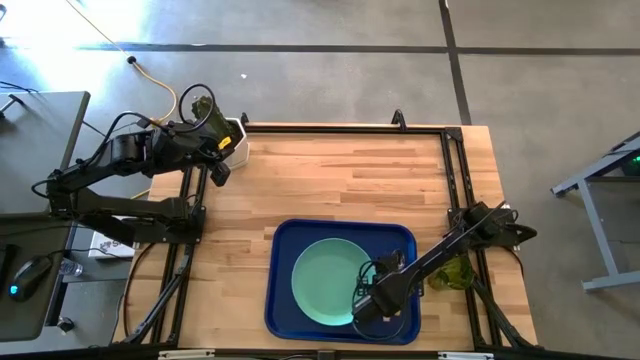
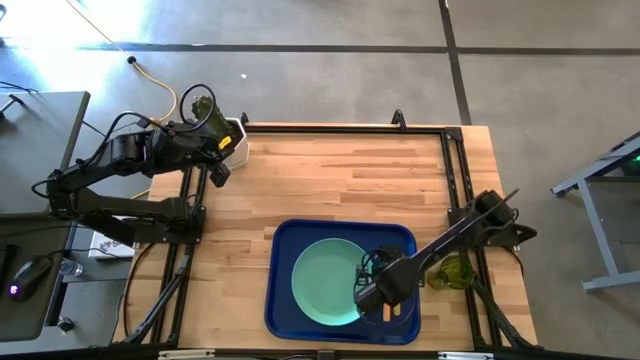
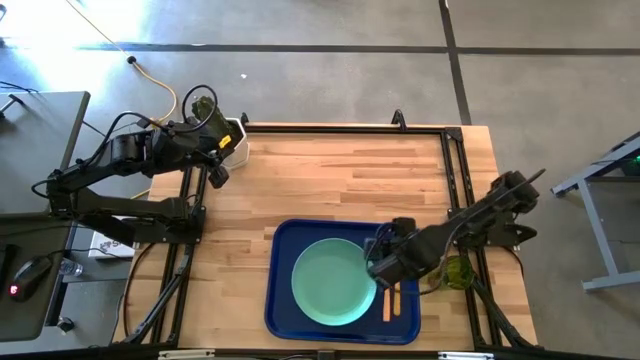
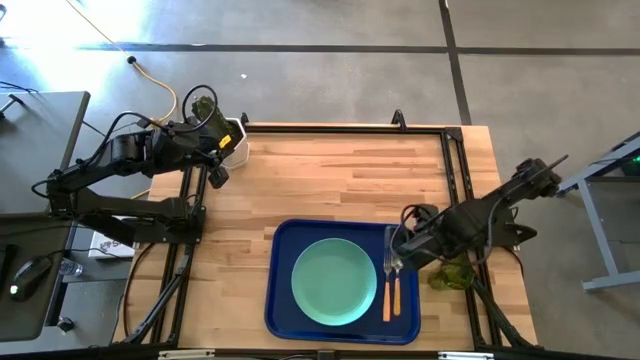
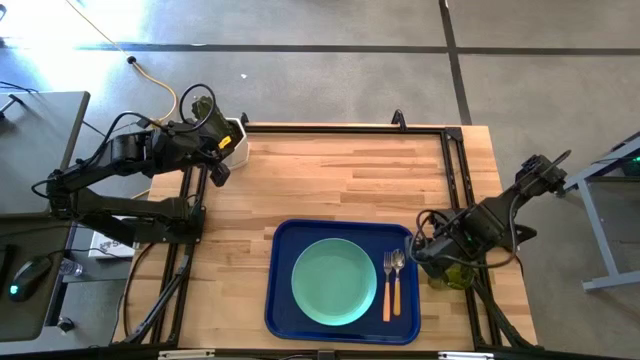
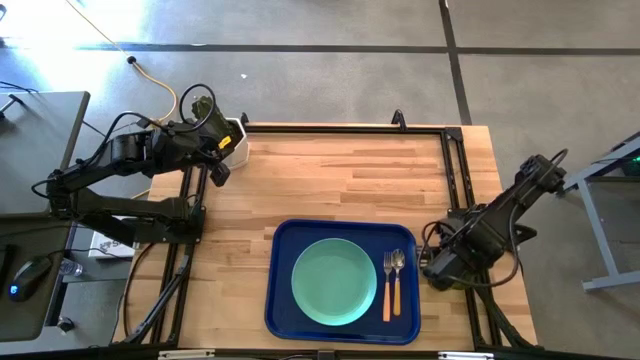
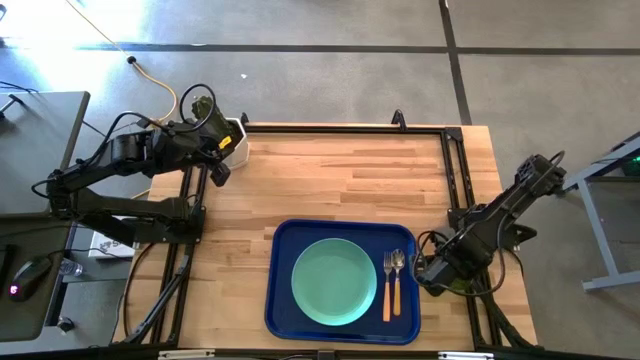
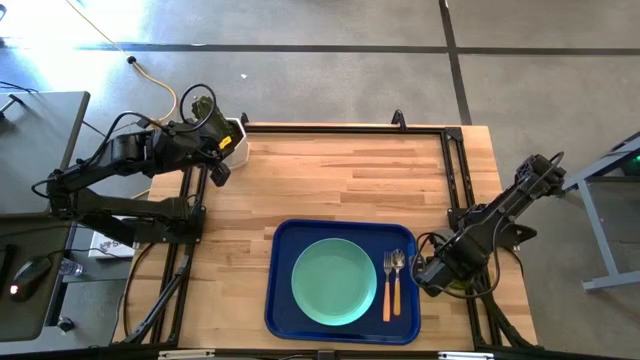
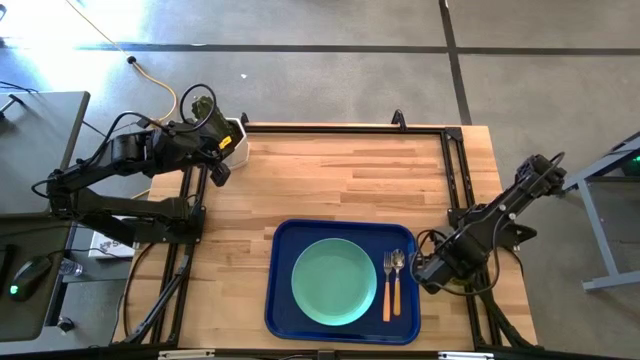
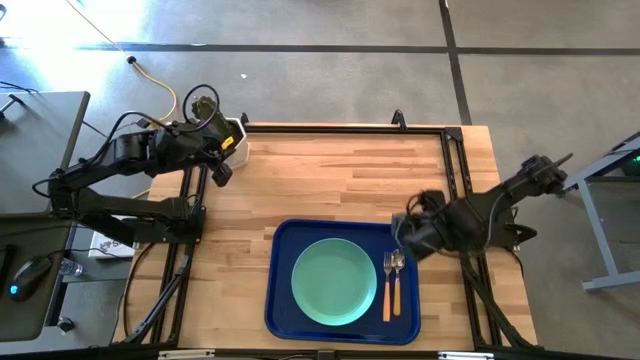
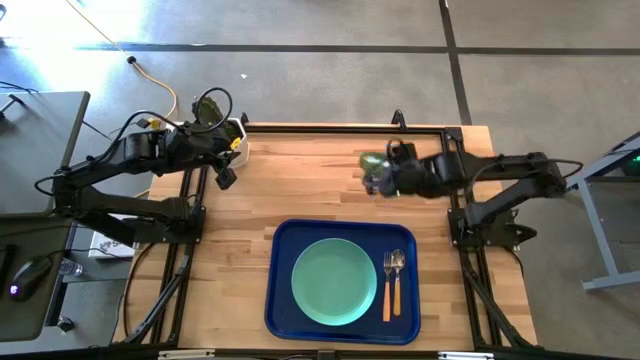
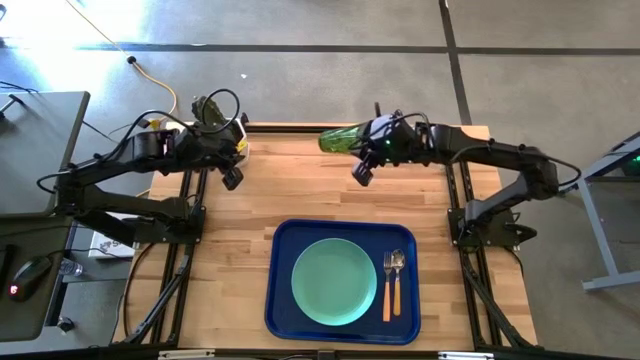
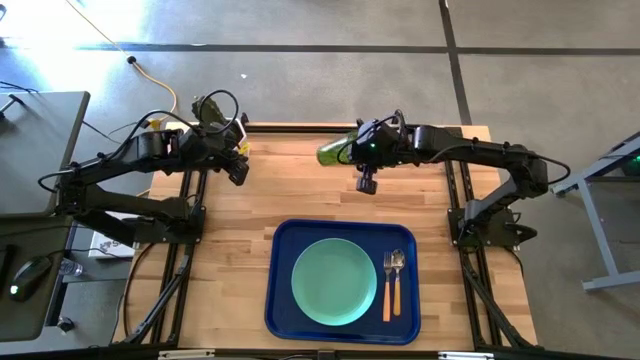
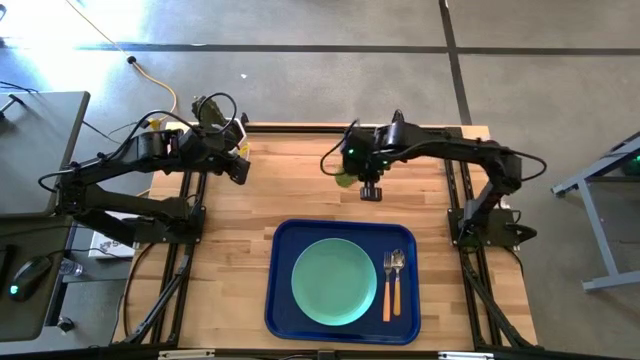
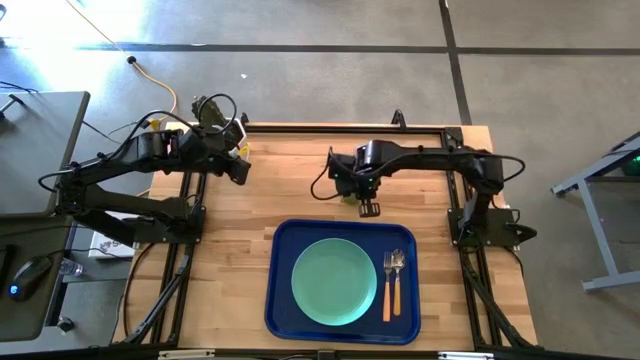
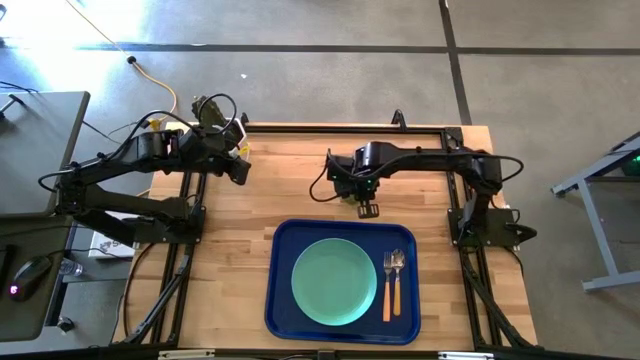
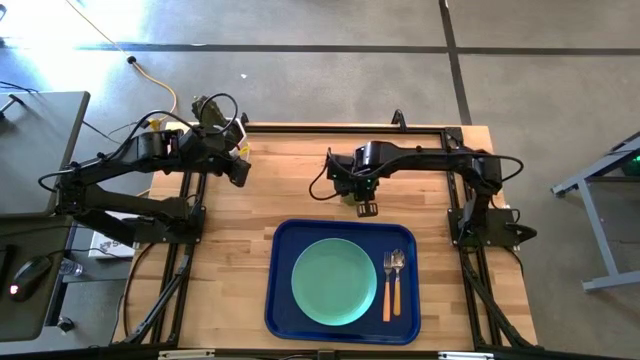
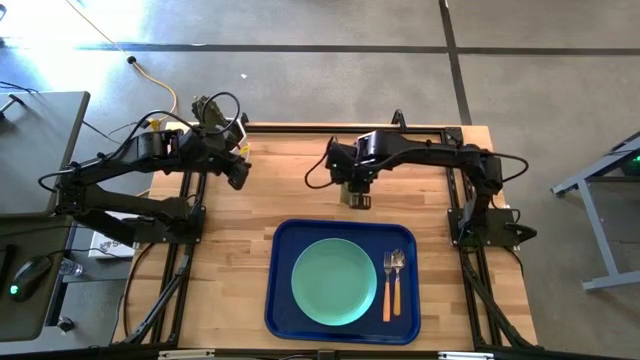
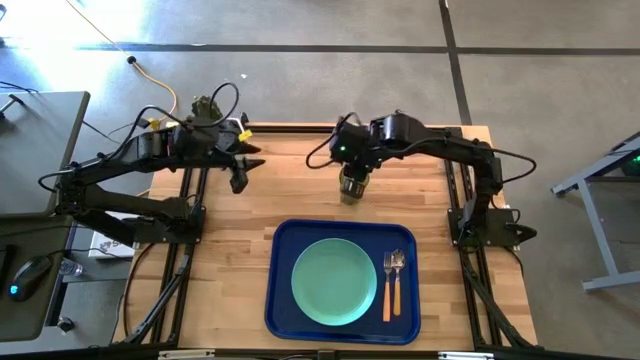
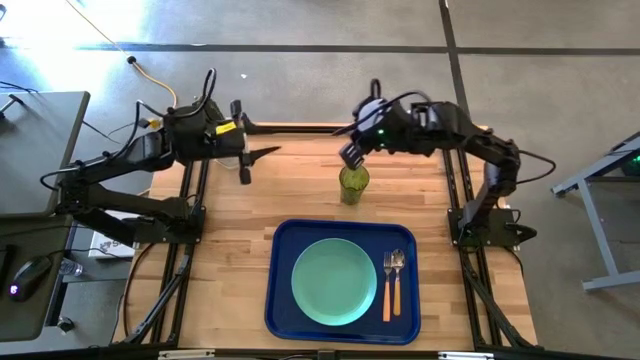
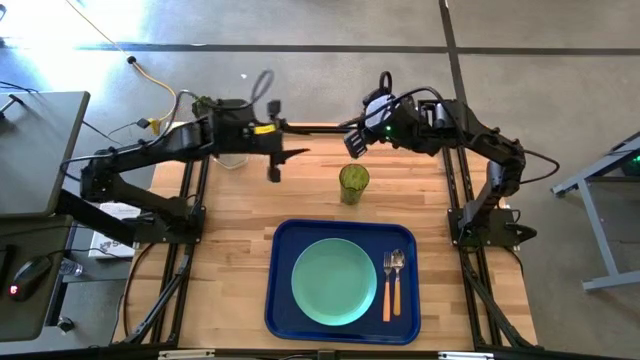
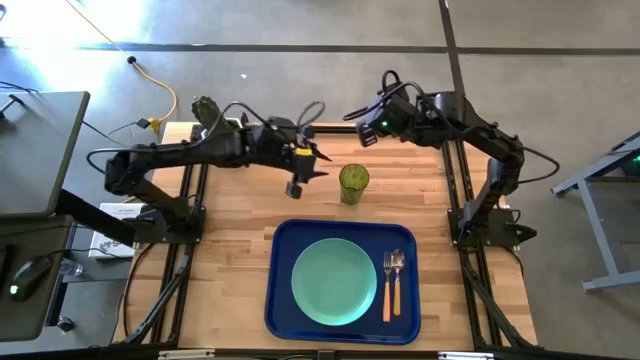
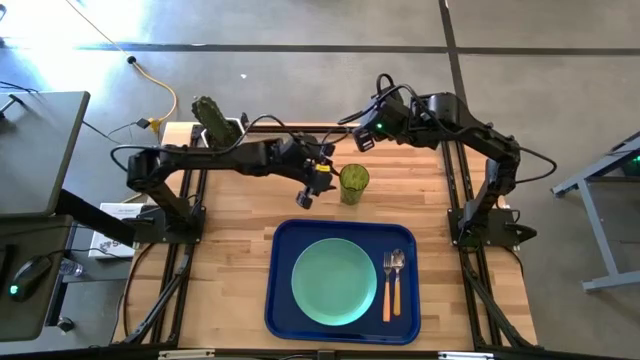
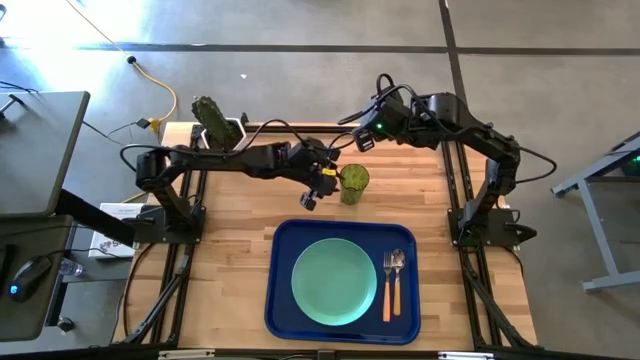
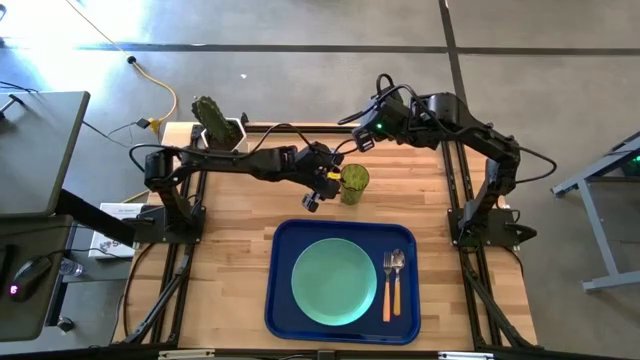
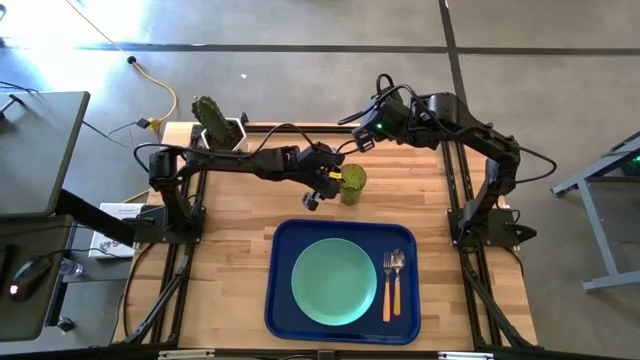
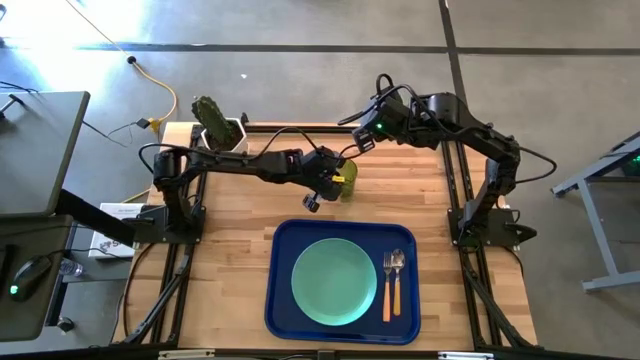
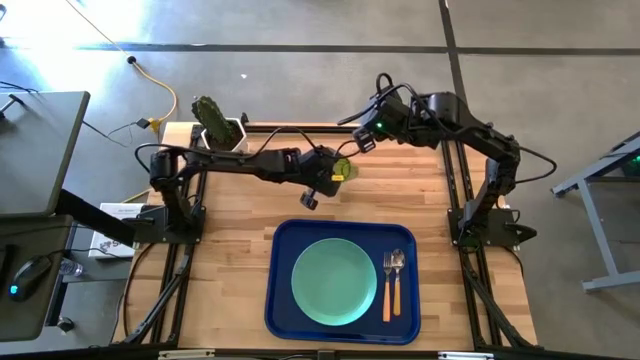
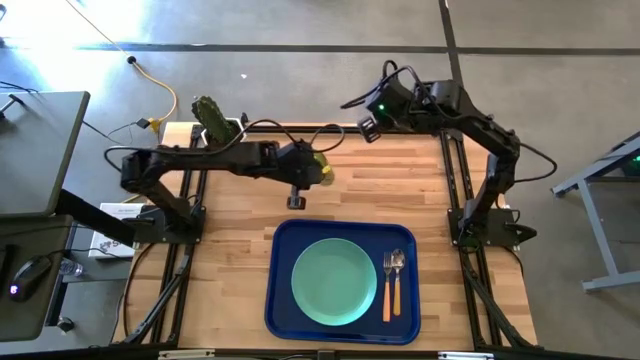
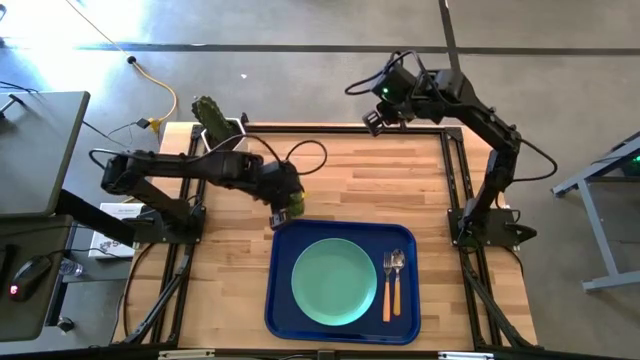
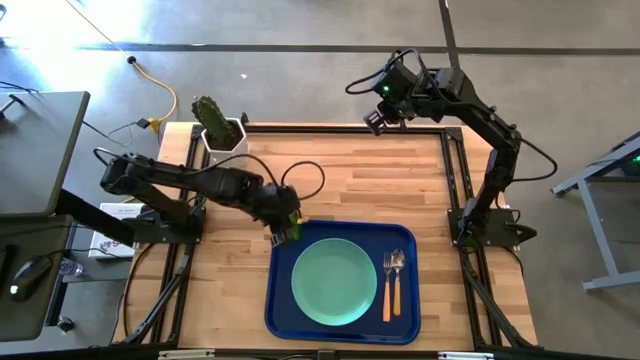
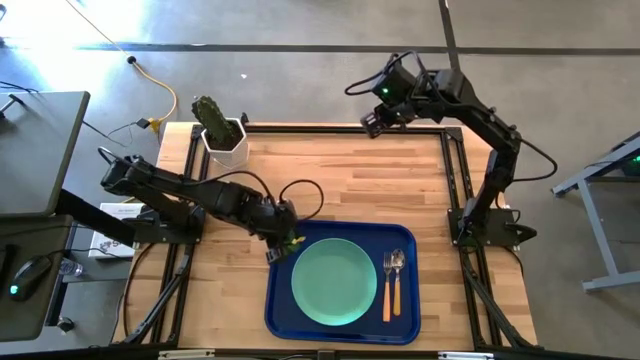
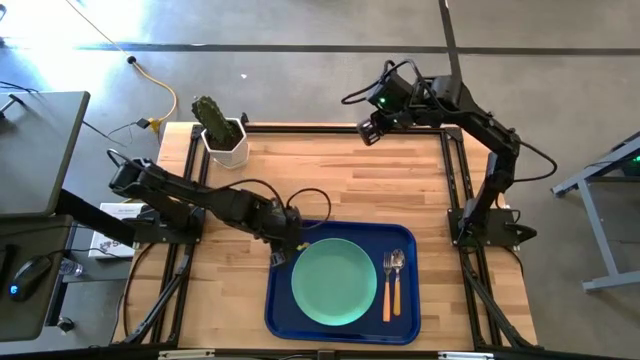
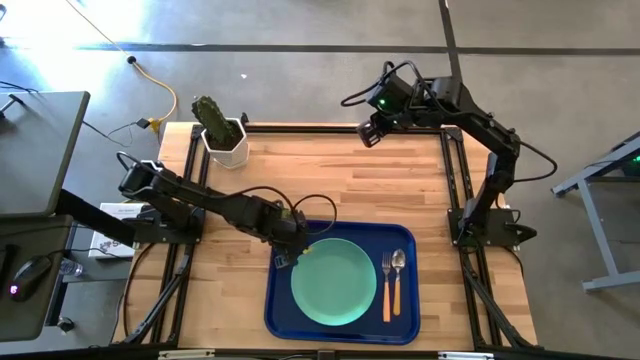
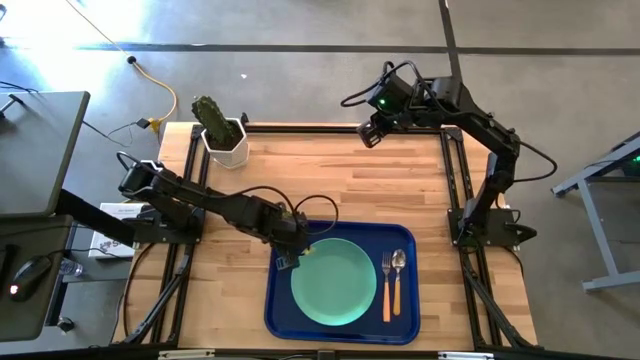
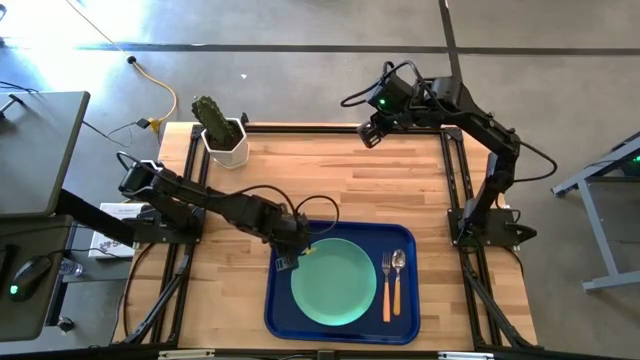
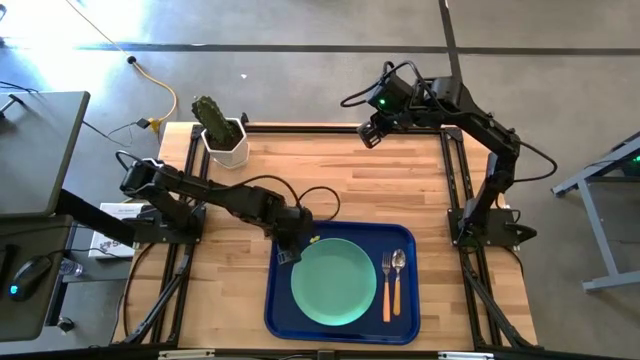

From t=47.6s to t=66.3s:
Task: Pick and place plate/cup/fork/spoon on tray
Put the green cup on the blue tray to the top left of the green plate

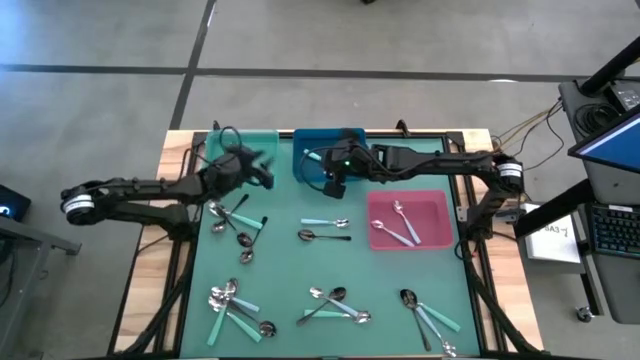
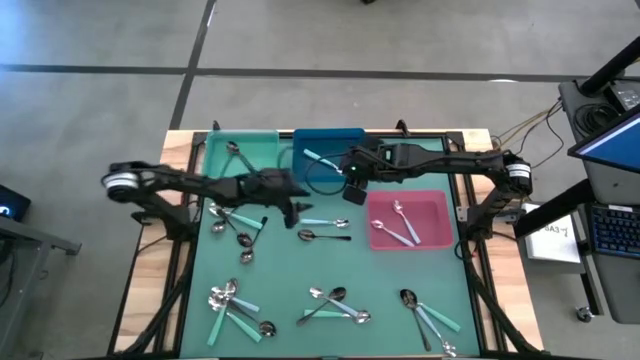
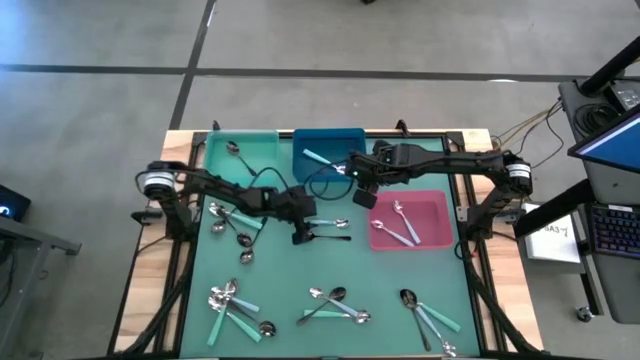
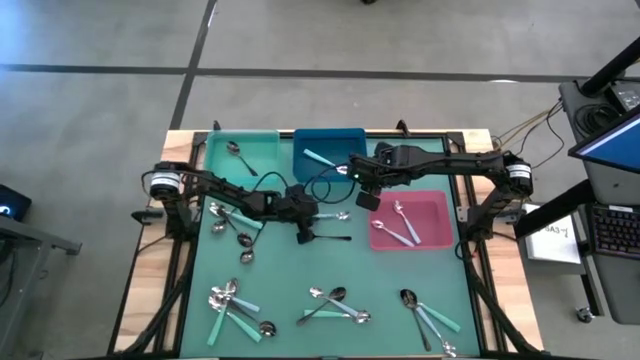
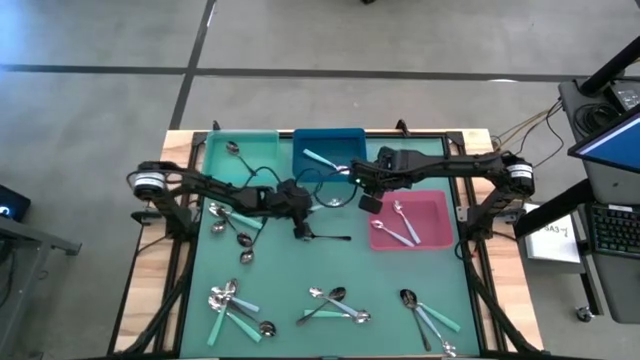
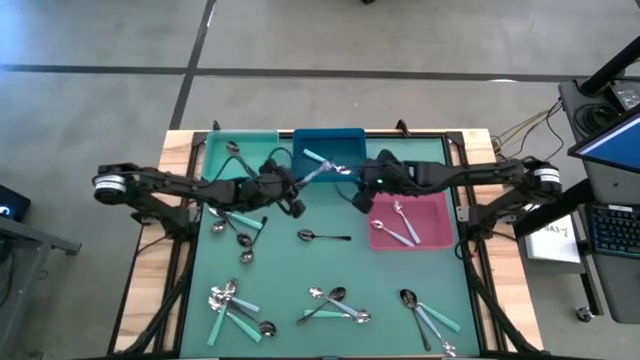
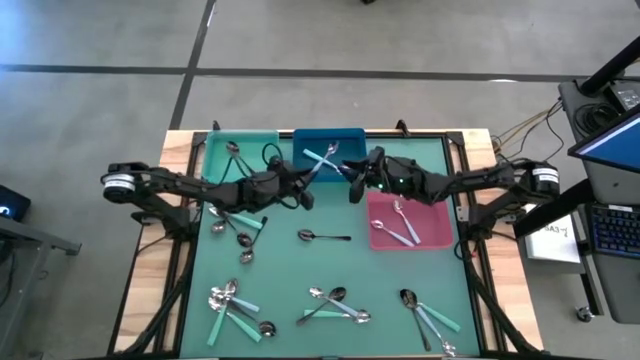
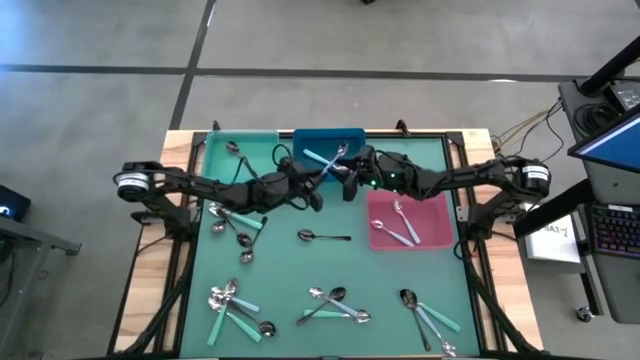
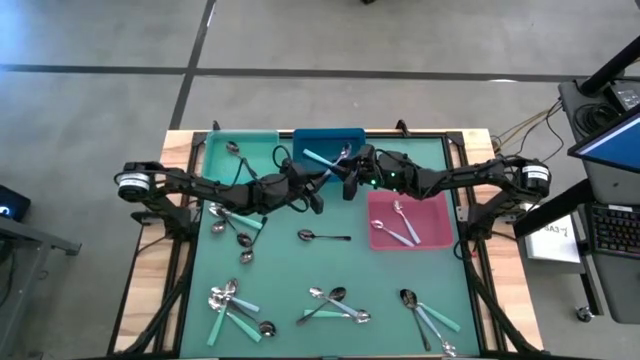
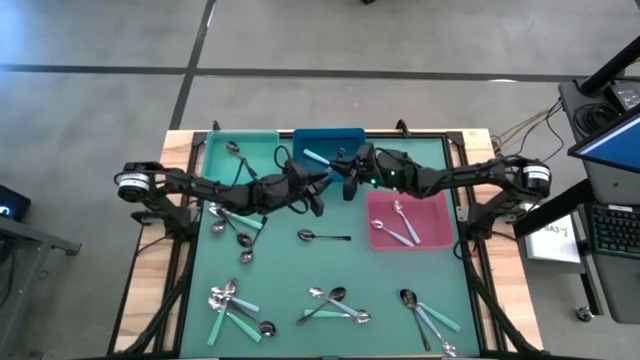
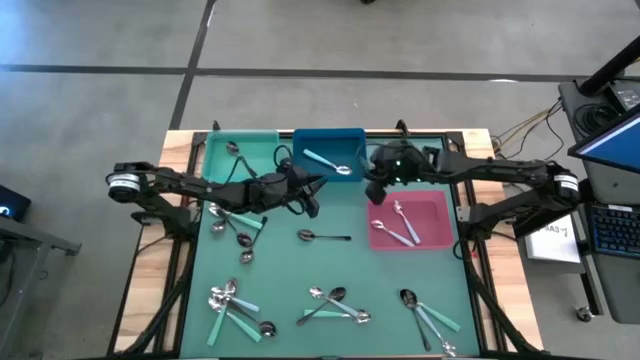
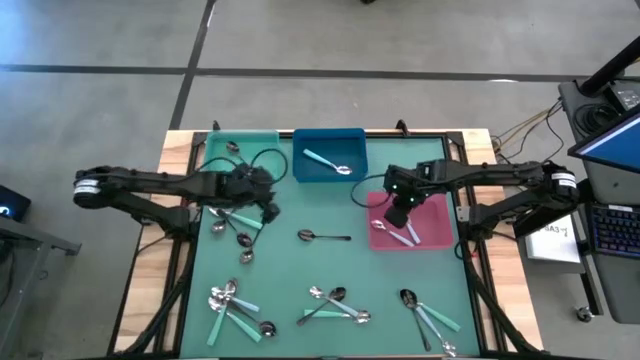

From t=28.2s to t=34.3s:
Task: Sort silverware by color (type)
Put the blue spoon into the red bin
